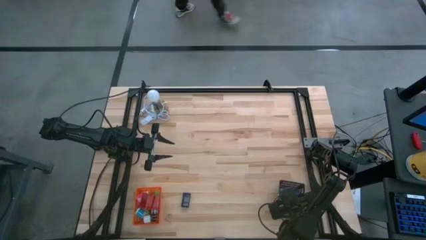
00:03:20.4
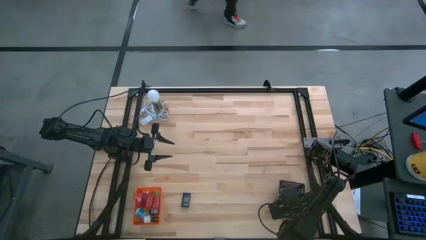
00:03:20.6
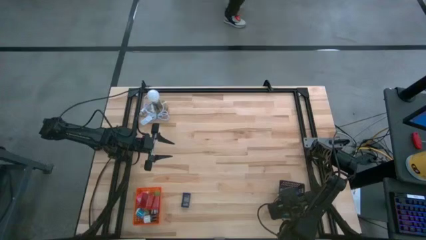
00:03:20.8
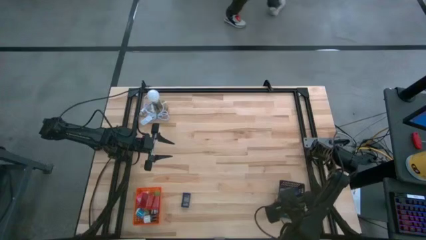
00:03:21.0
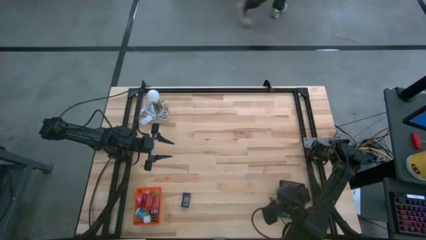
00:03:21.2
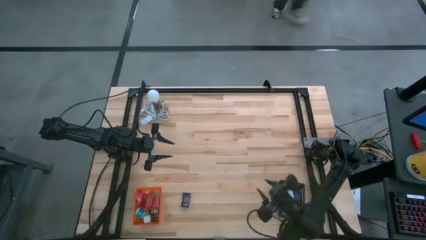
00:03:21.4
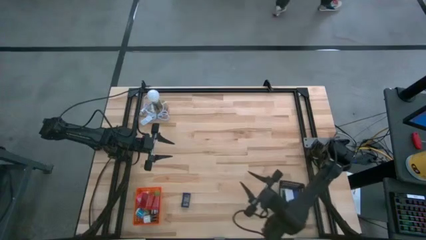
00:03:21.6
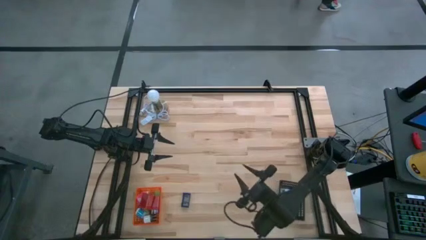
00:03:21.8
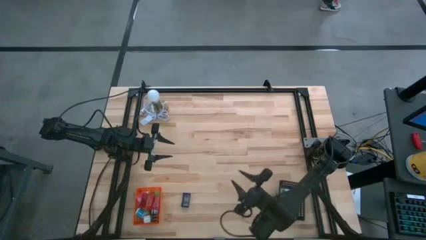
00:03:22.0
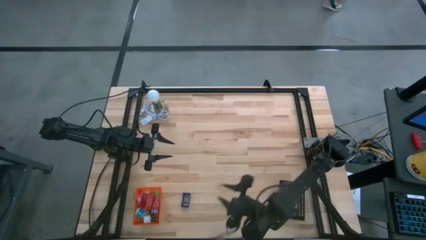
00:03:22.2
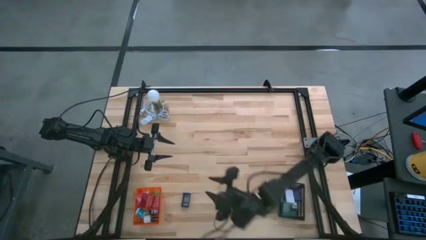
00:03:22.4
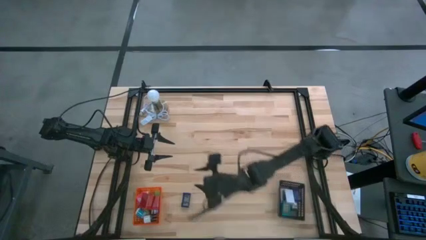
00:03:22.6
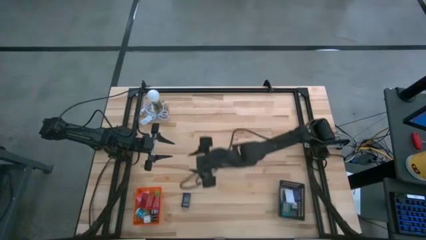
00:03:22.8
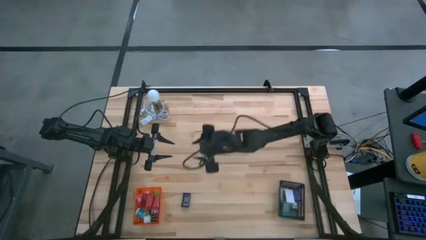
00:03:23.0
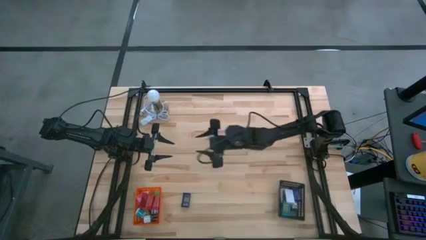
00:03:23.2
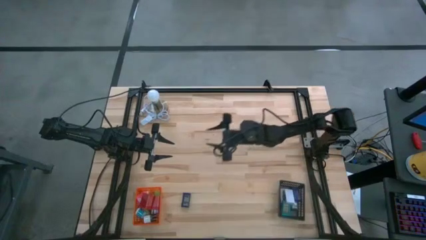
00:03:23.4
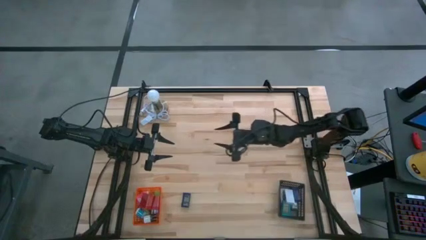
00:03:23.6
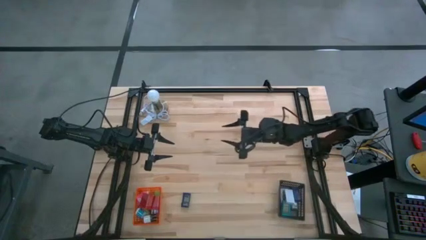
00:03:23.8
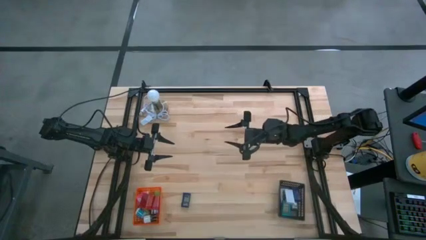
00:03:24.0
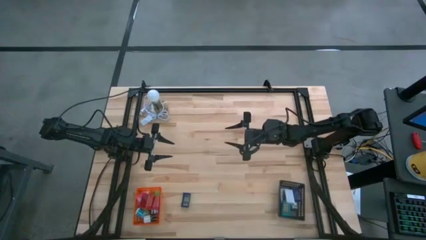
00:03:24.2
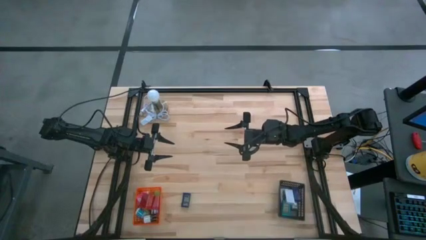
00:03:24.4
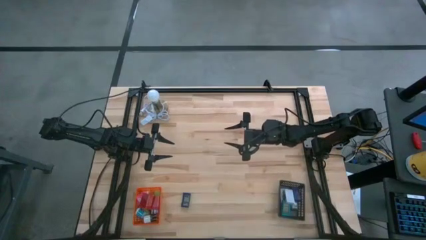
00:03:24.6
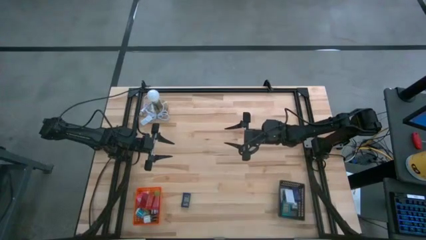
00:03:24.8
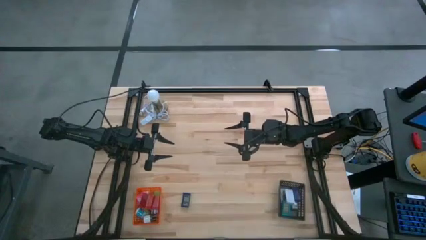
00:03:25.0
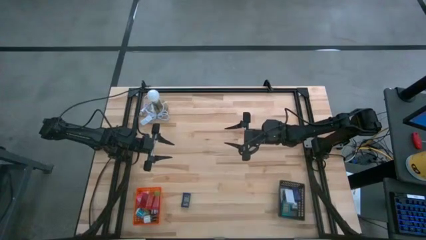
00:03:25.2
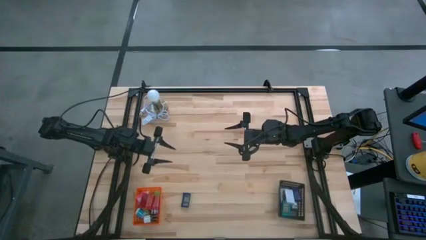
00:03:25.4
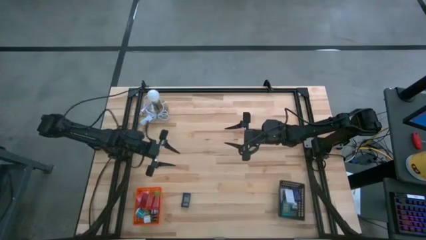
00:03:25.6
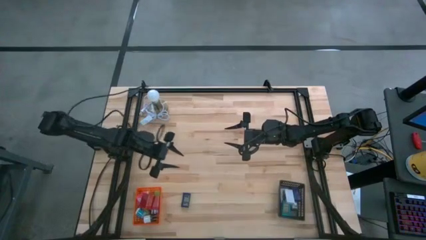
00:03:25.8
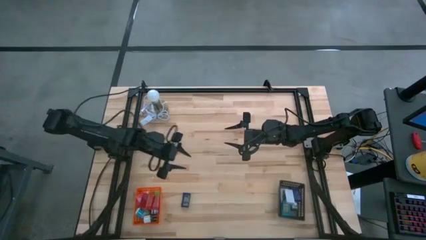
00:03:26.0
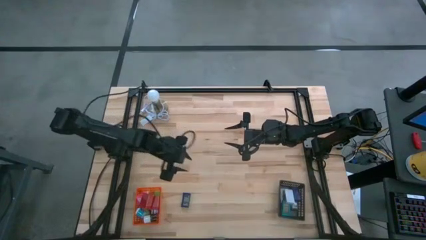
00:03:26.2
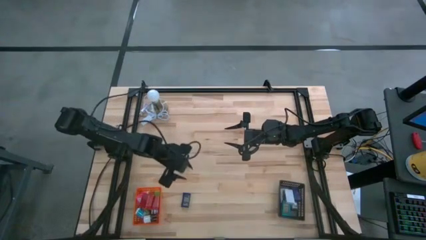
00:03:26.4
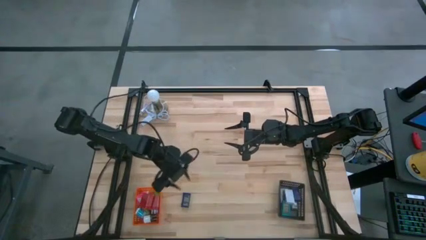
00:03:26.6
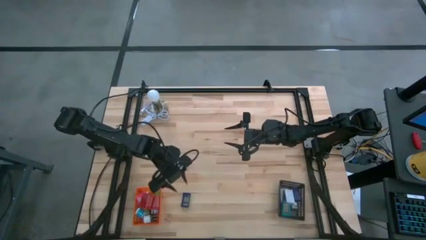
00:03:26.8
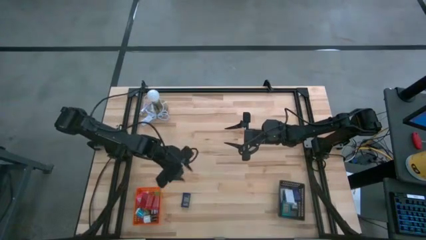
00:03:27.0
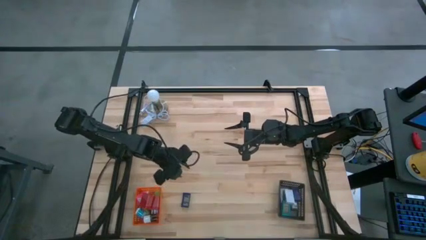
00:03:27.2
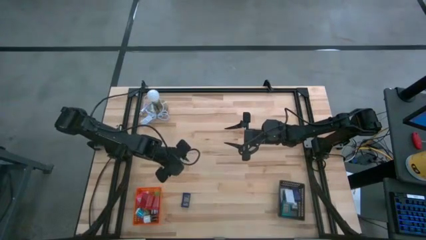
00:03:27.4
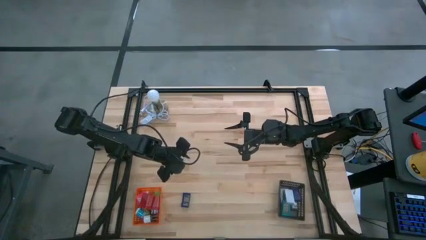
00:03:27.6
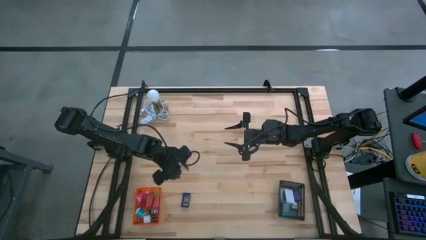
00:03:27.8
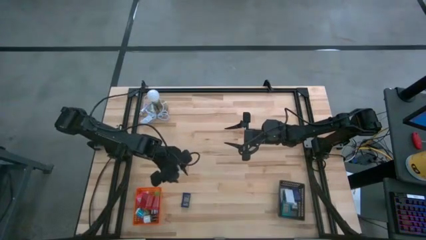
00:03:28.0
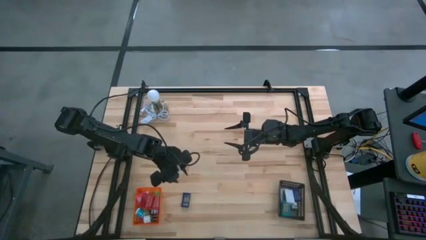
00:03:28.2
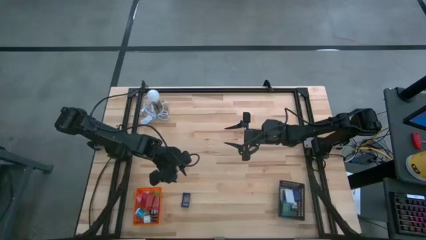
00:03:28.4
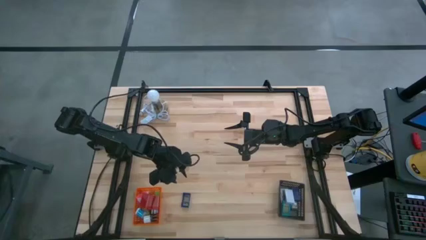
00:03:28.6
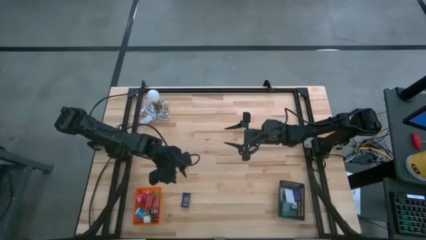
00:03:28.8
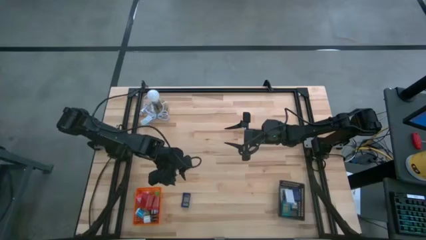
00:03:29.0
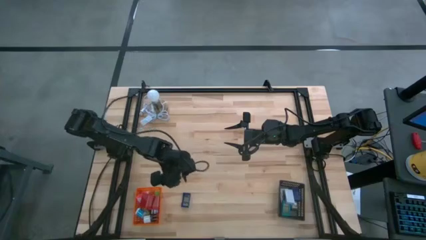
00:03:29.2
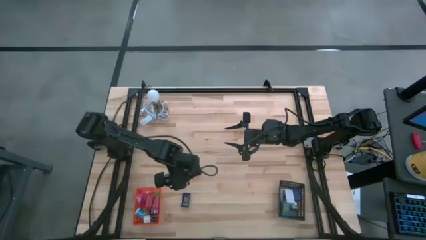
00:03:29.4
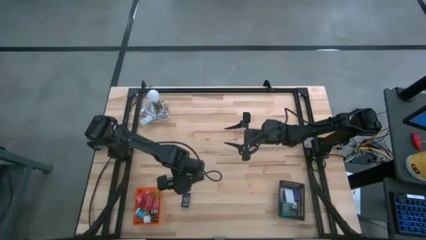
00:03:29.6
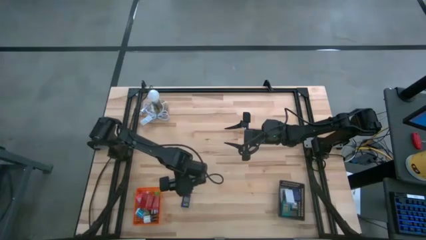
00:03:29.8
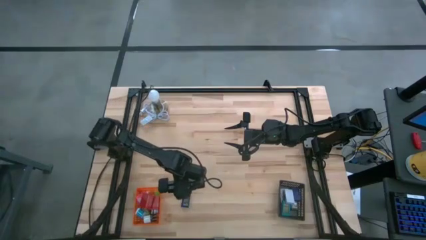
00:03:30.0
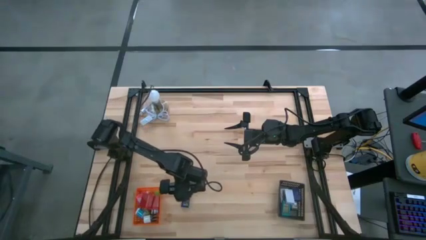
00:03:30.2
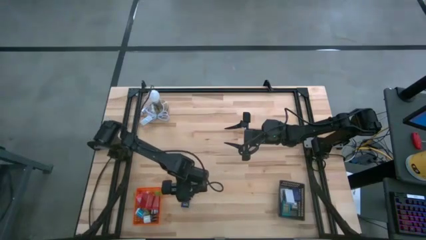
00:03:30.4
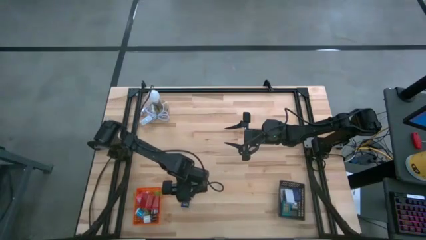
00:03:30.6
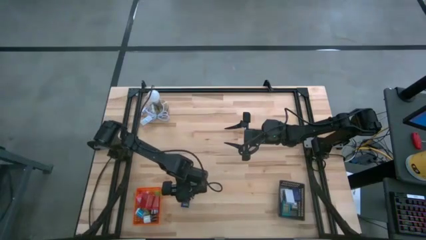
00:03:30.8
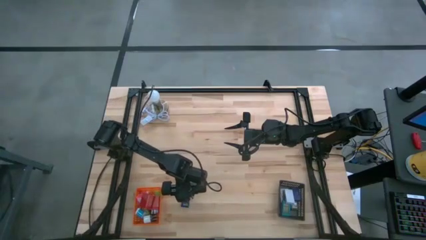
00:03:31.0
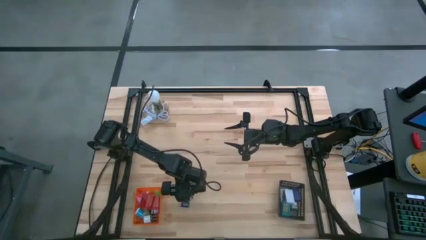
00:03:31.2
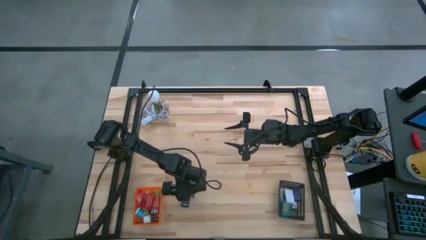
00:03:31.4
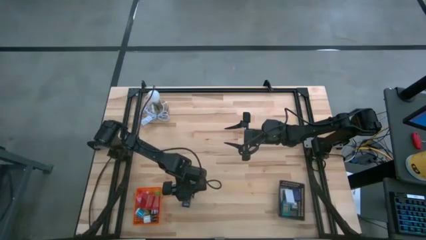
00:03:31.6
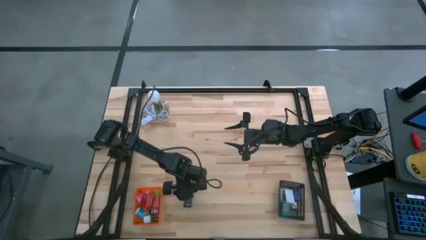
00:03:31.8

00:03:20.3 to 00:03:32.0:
Task: Pick & Place Office items
Put the blue digital clock into the black bin

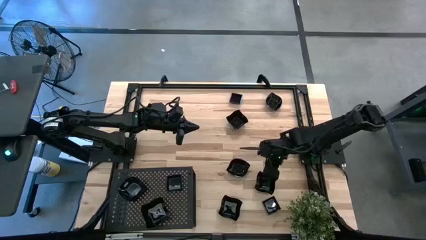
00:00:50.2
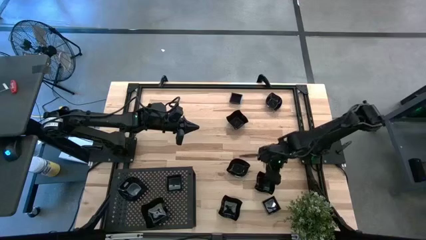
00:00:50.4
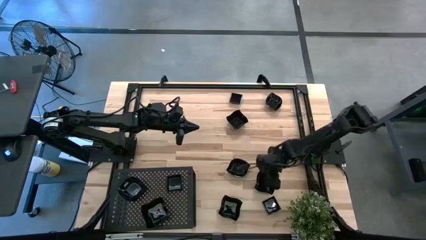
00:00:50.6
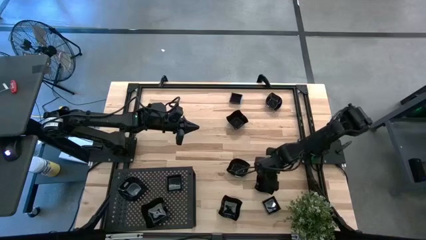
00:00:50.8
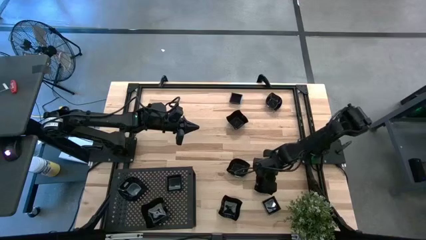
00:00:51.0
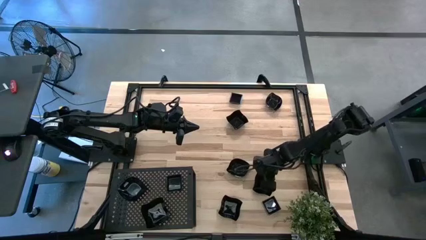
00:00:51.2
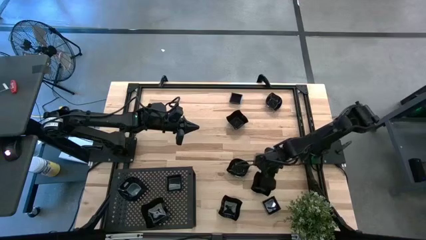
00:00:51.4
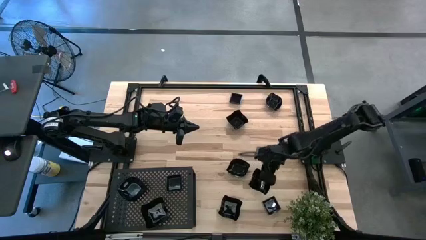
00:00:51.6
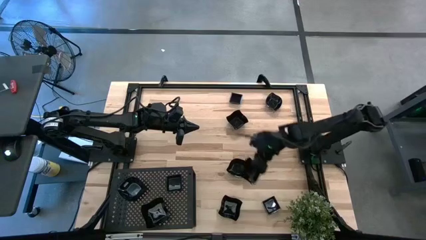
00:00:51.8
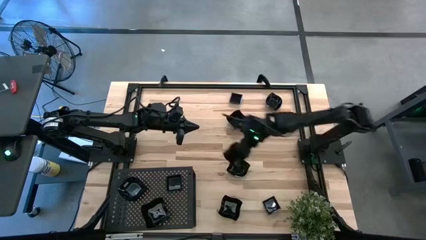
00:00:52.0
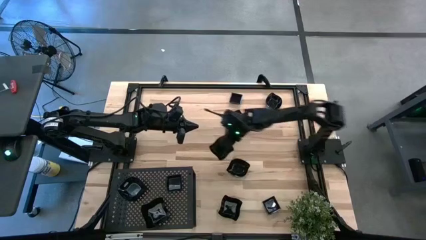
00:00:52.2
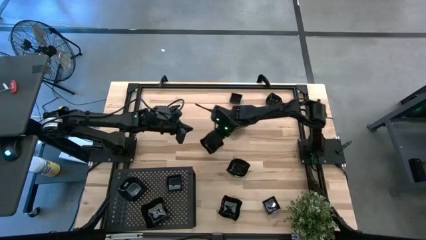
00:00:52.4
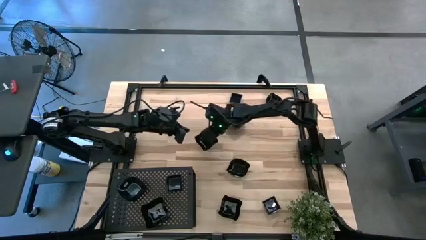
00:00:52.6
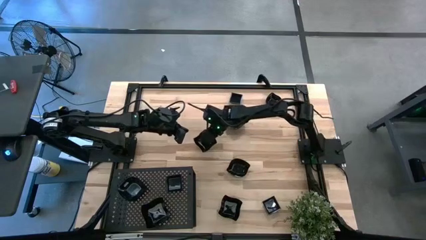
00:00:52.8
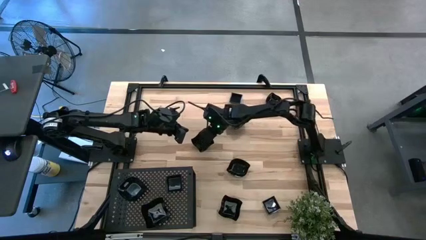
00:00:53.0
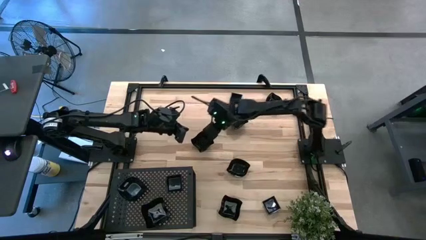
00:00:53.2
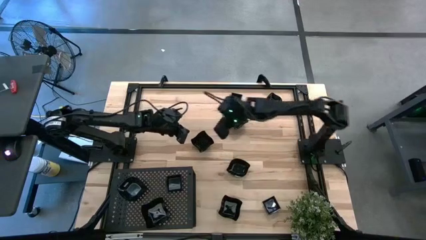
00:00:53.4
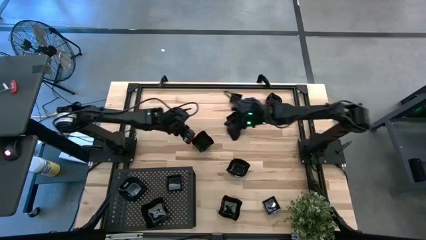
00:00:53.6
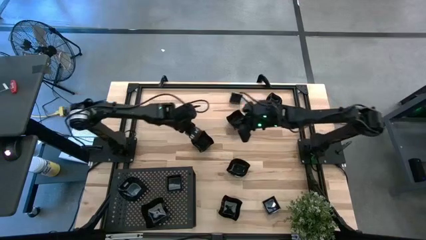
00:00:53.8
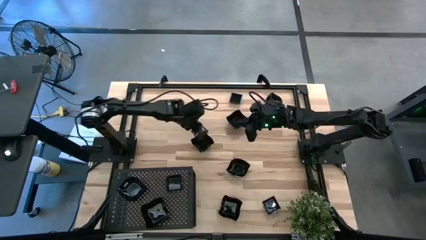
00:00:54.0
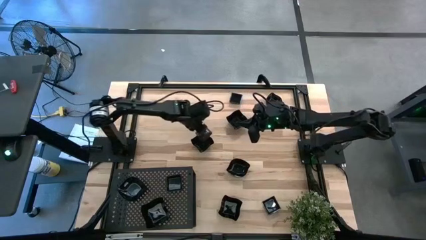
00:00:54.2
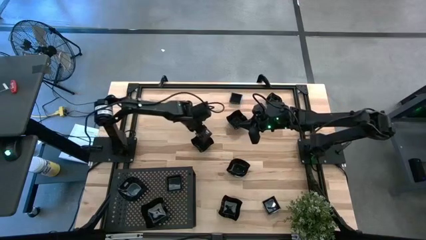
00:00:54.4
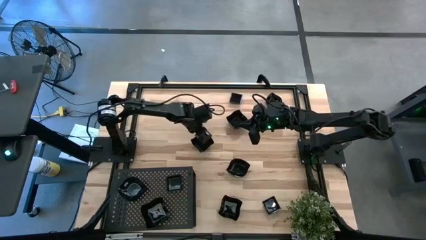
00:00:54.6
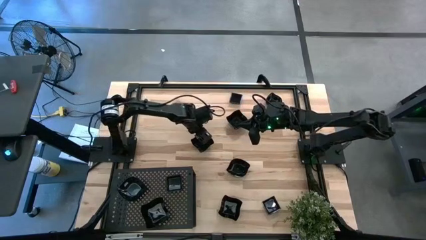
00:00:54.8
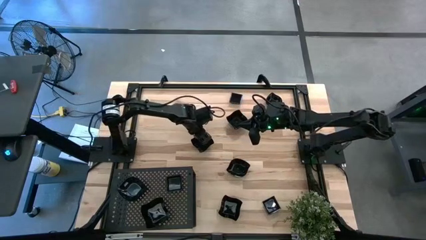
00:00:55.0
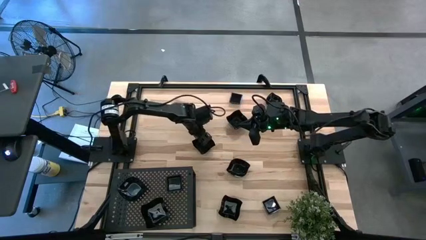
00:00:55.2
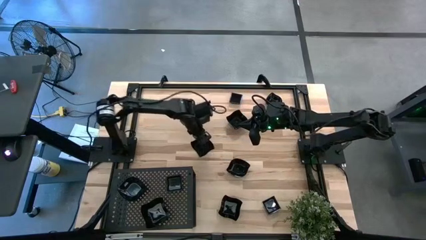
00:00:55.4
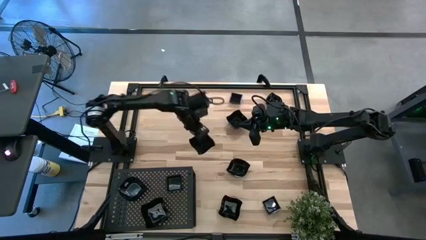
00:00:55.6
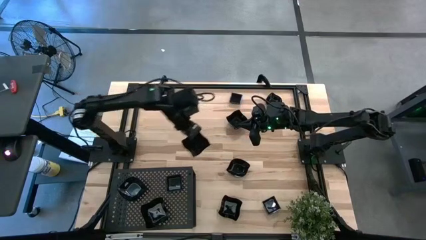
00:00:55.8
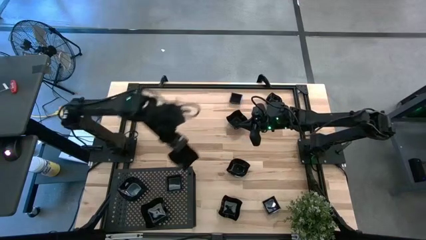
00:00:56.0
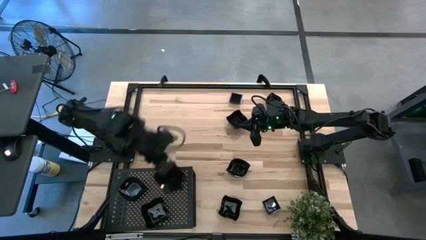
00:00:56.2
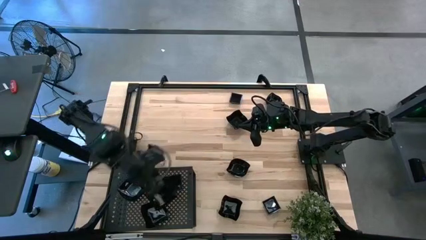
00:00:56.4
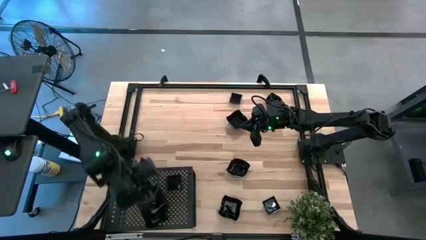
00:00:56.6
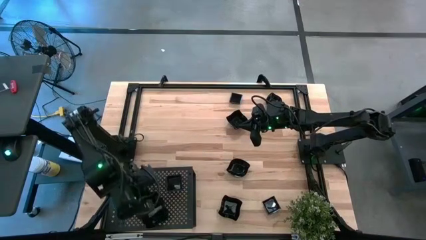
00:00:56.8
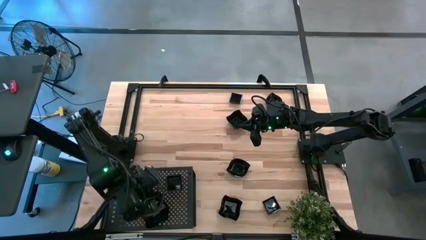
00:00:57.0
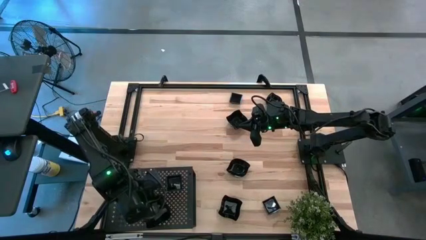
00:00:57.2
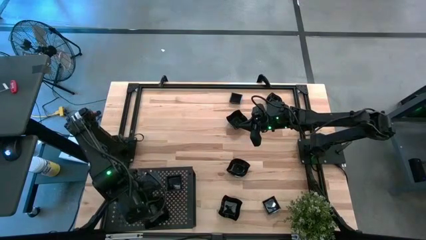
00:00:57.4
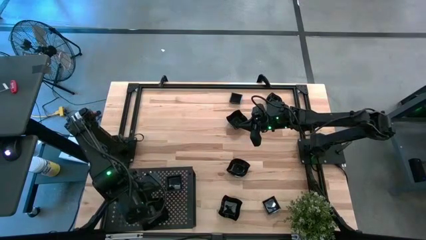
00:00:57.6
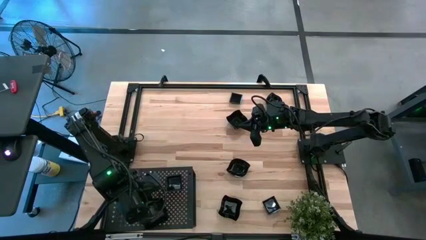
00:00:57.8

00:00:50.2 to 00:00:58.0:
Task: Pick & Place Mini shaped plates
Stack the distorted square plate on top of the distorted square plate on the shelf
